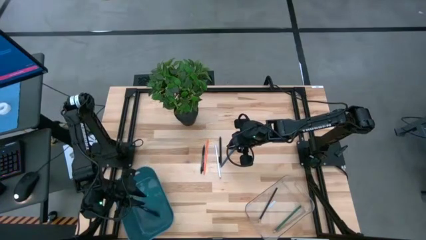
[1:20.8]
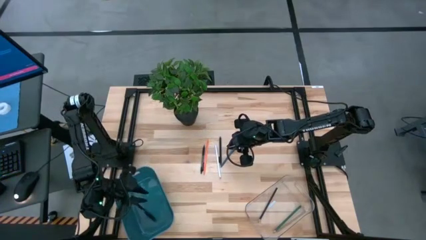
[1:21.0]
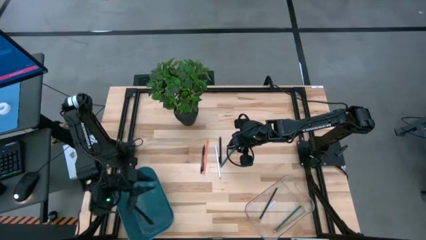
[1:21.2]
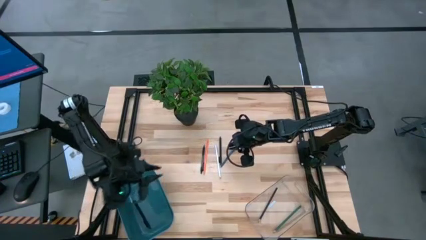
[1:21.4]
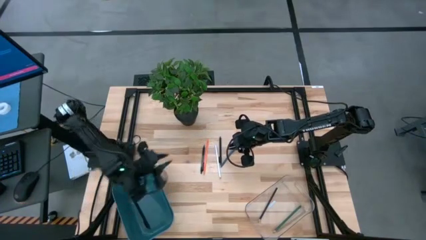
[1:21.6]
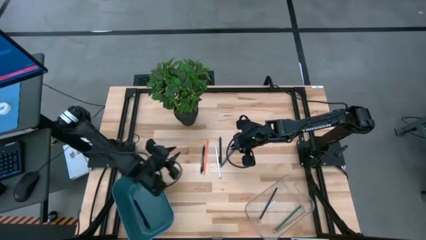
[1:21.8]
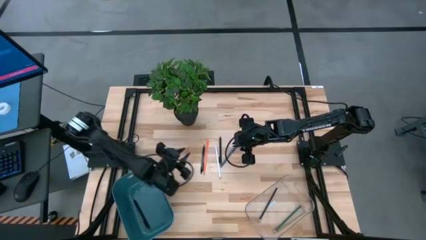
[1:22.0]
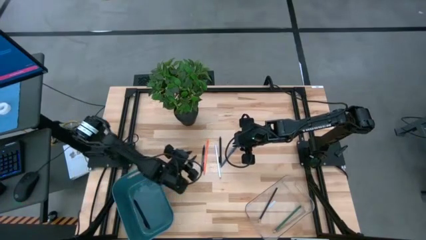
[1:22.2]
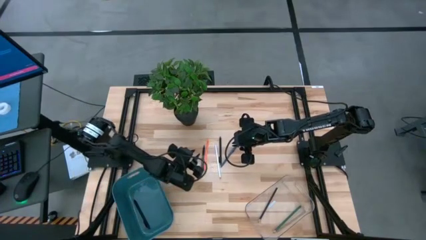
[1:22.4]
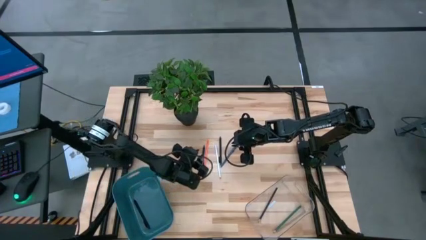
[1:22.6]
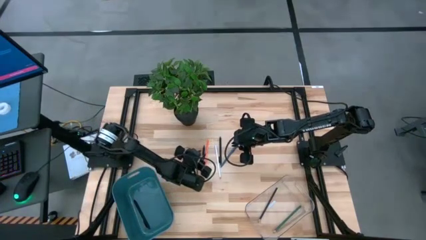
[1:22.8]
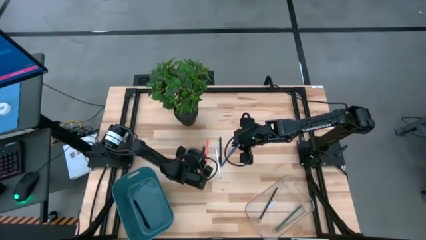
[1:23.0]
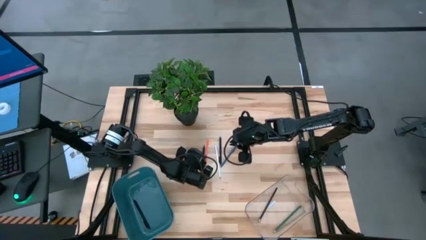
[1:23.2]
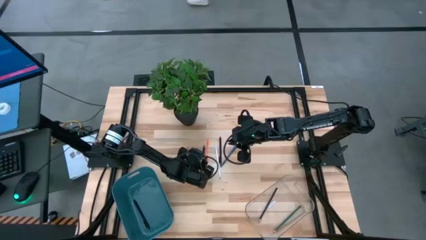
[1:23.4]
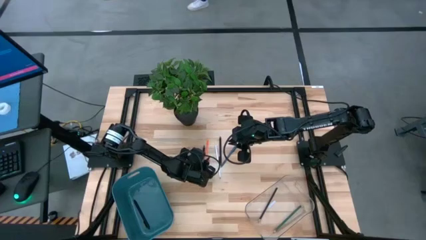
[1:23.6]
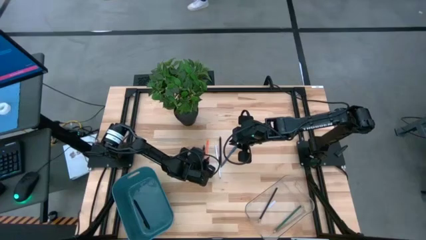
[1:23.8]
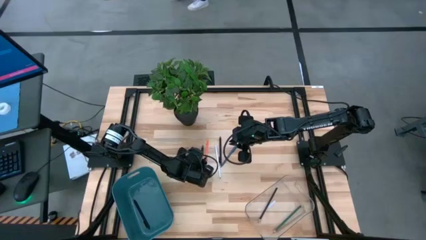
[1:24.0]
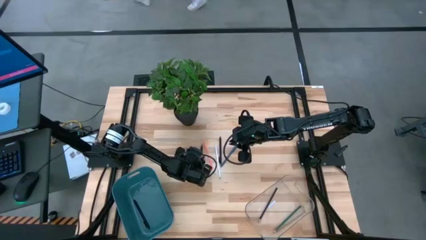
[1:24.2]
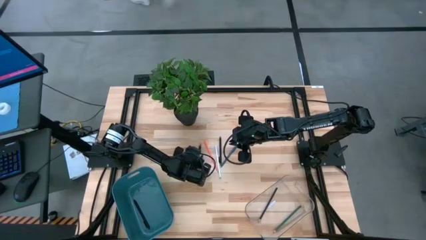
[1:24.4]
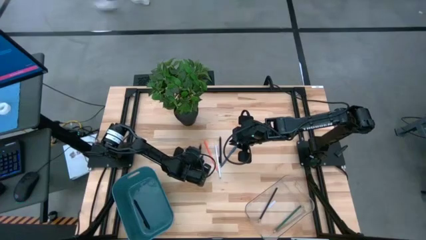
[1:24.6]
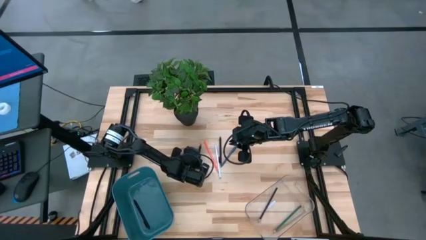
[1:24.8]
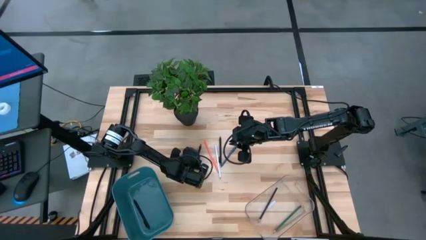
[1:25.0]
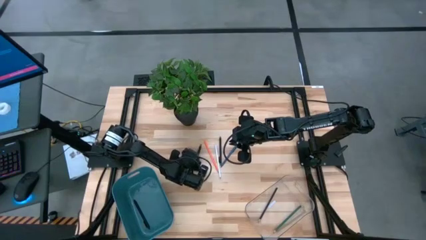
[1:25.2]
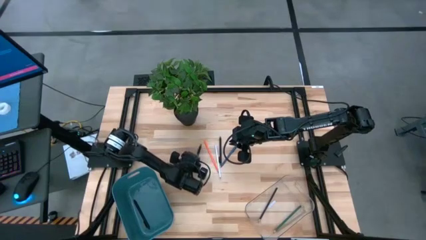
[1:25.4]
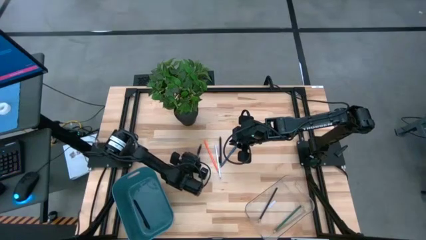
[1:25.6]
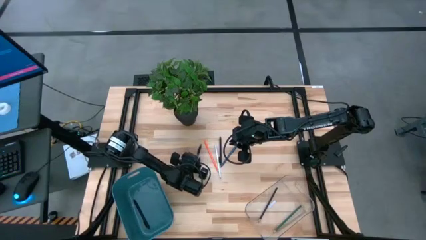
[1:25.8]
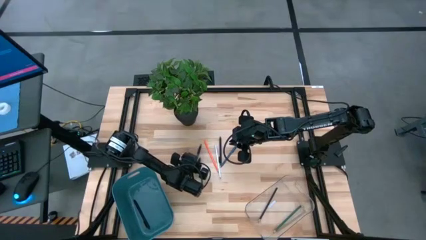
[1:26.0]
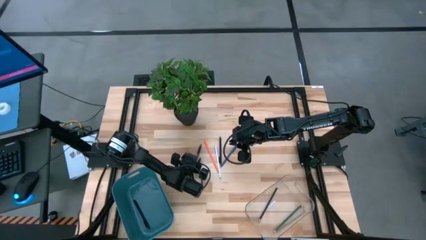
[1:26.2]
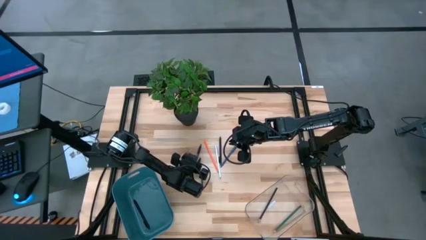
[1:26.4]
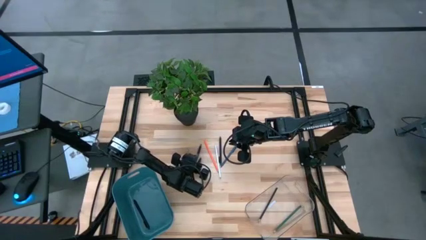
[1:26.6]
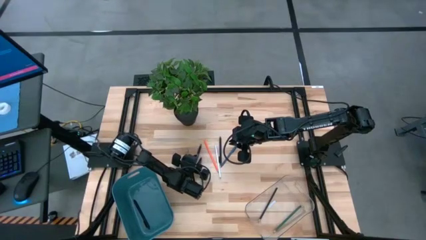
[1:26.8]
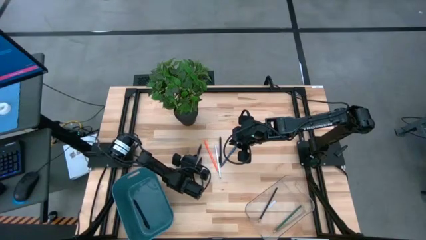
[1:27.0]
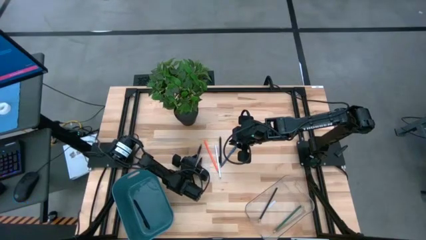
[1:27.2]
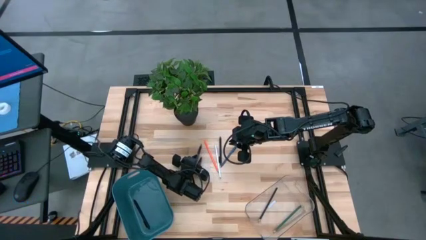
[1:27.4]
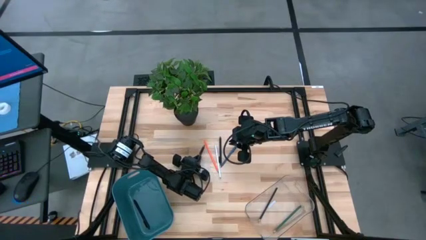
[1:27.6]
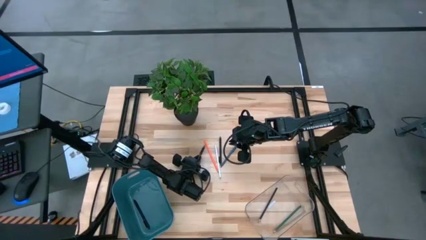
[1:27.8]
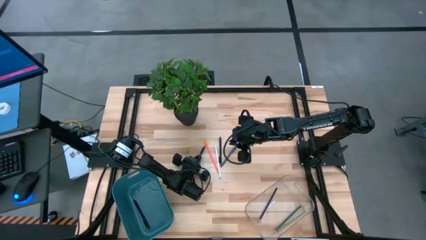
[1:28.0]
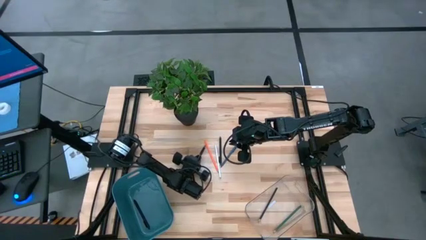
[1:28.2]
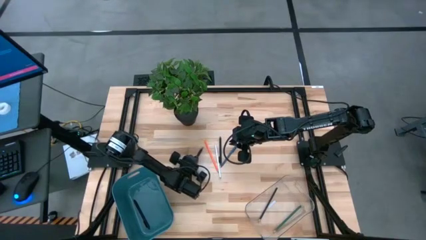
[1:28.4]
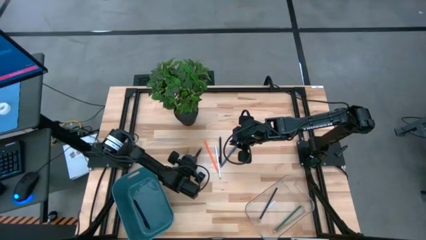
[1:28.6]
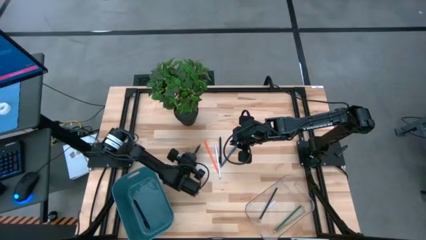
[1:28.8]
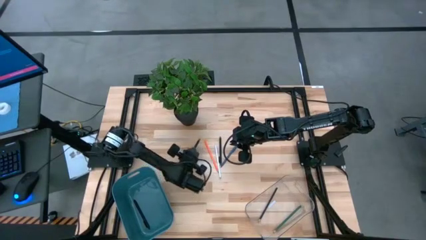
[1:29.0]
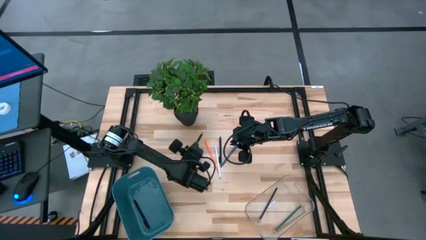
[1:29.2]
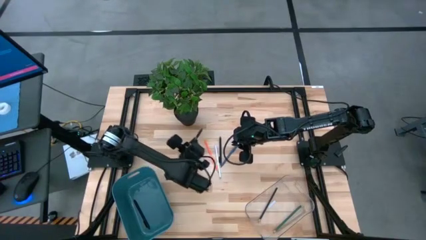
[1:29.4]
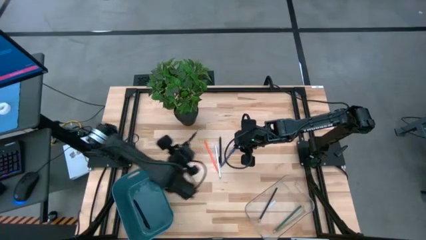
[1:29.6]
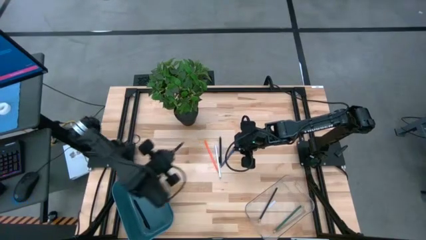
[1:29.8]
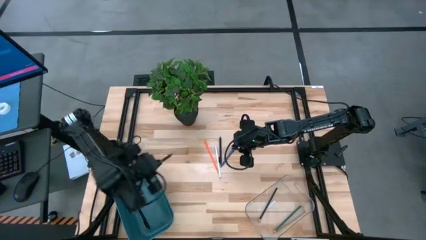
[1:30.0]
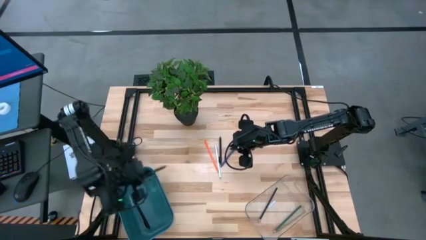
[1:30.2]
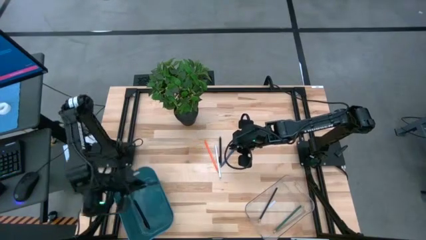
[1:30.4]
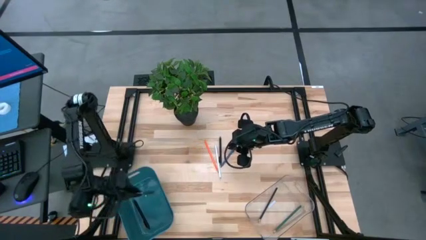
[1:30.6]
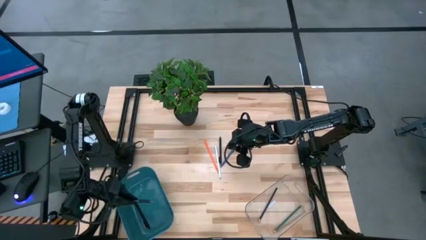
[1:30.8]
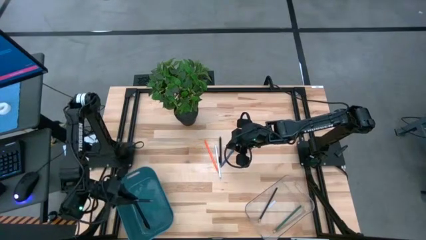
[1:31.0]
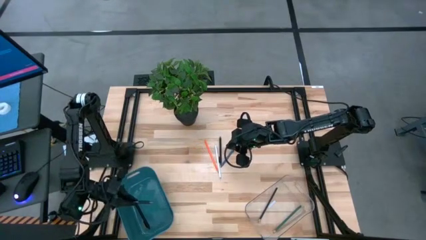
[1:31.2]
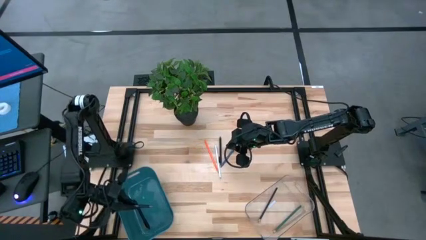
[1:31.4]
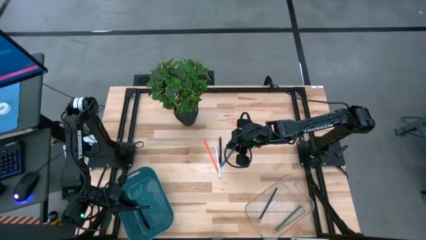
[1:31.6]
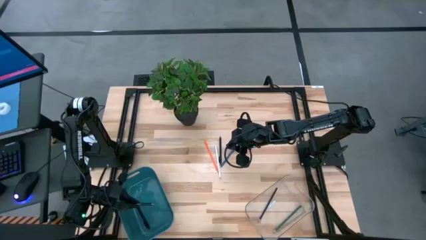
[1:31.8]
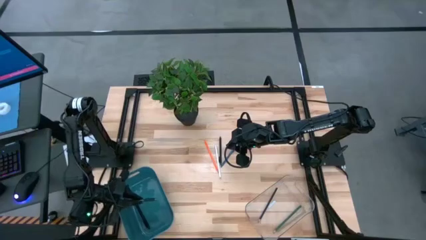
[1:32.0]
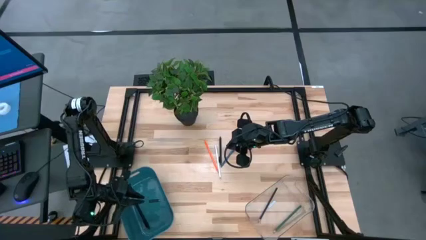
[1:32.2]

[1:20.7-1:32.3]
Task: Sort pens & pencils
Put the left black pen into the blue bin

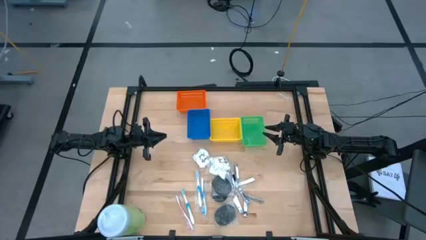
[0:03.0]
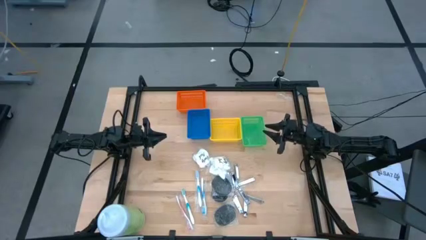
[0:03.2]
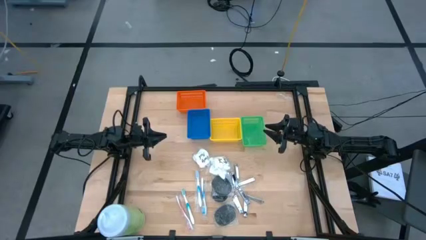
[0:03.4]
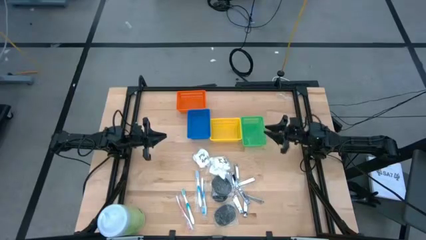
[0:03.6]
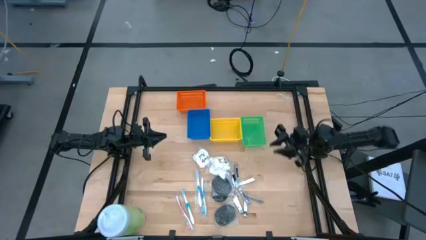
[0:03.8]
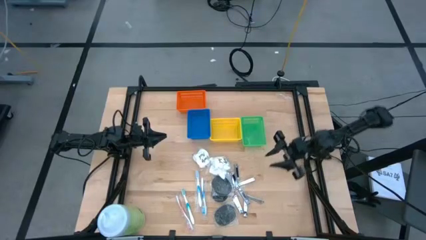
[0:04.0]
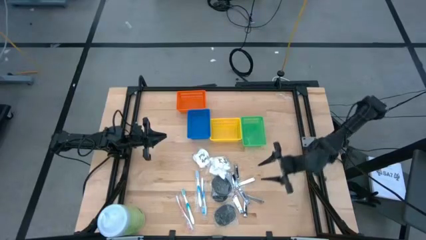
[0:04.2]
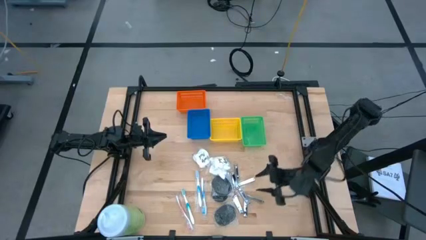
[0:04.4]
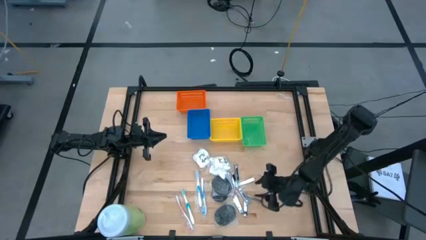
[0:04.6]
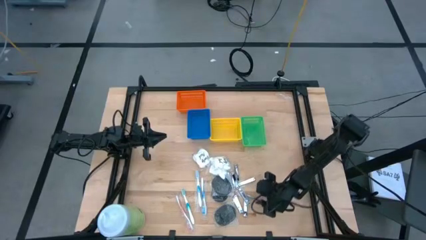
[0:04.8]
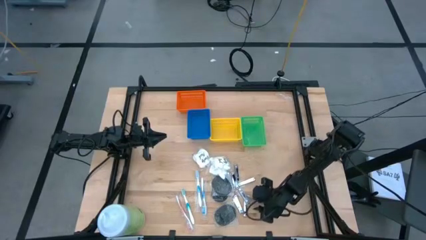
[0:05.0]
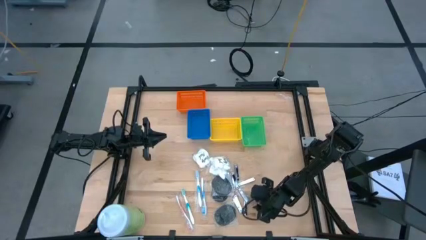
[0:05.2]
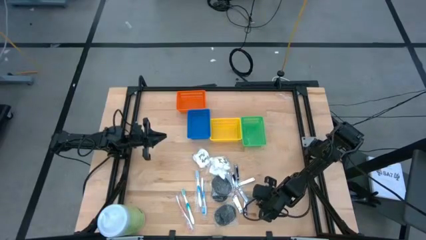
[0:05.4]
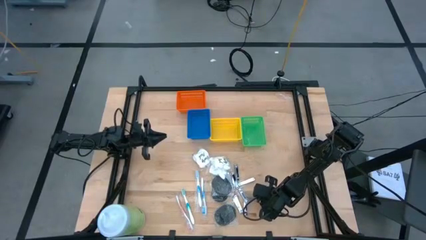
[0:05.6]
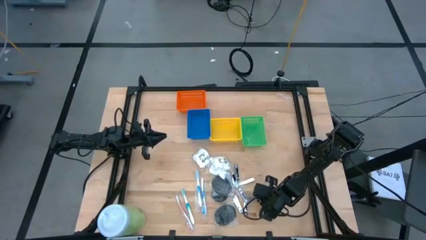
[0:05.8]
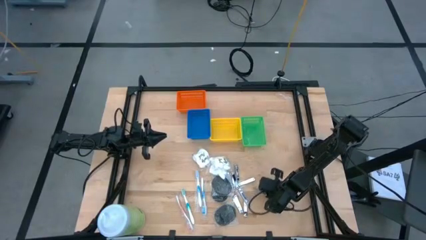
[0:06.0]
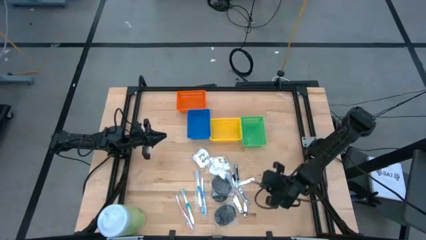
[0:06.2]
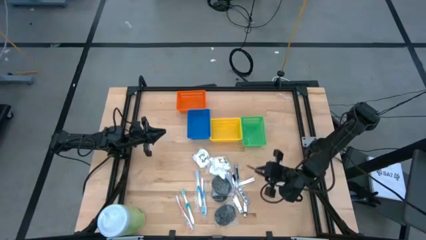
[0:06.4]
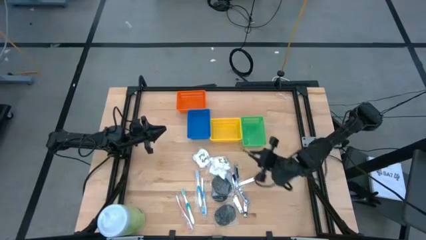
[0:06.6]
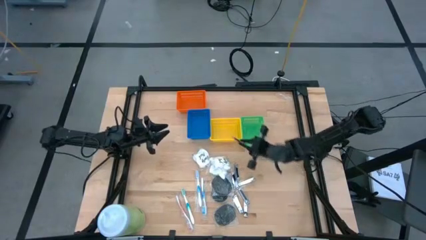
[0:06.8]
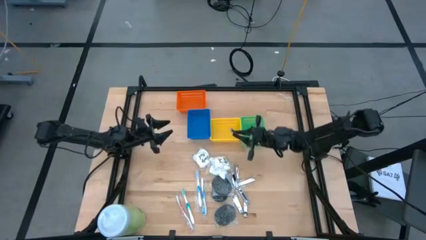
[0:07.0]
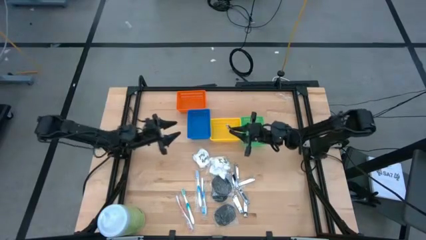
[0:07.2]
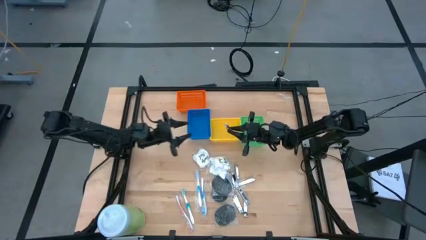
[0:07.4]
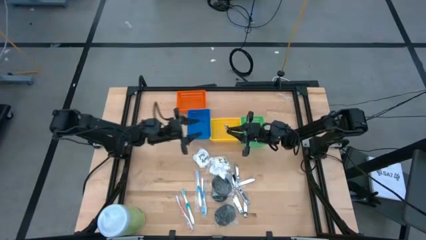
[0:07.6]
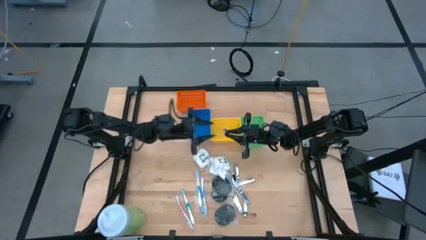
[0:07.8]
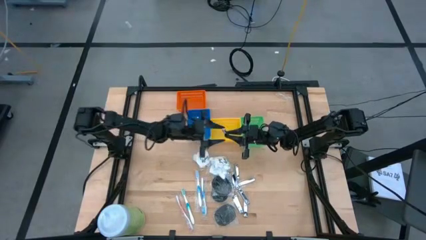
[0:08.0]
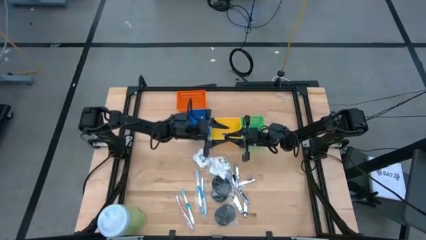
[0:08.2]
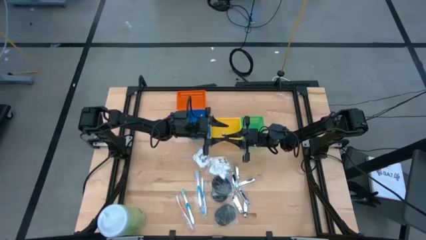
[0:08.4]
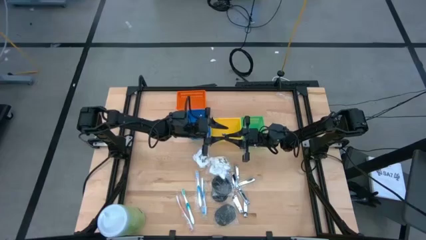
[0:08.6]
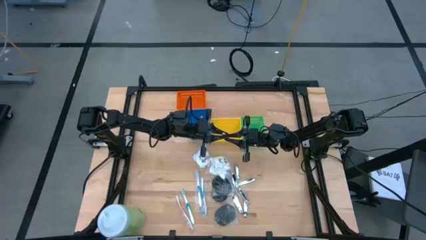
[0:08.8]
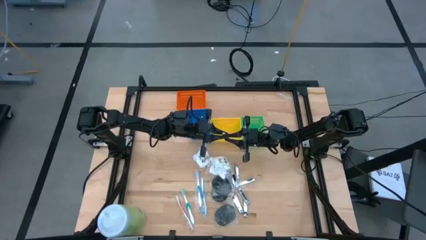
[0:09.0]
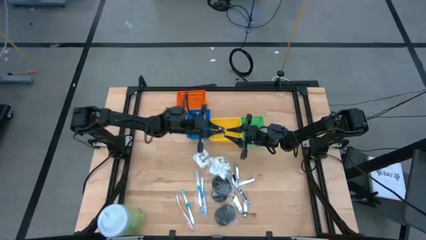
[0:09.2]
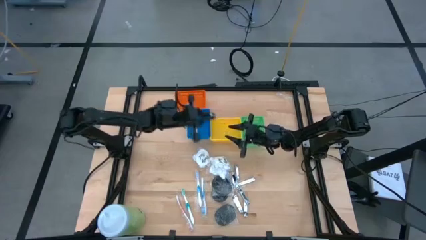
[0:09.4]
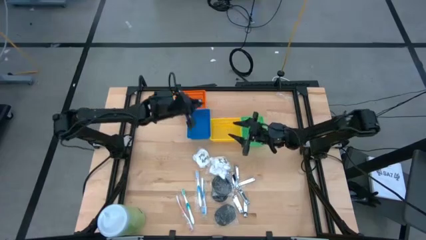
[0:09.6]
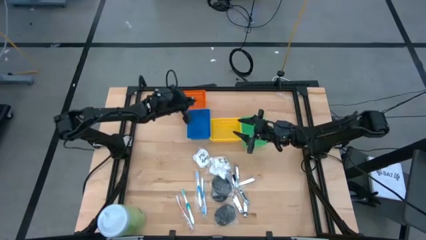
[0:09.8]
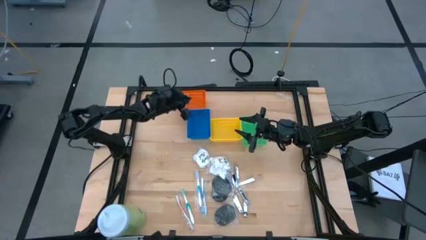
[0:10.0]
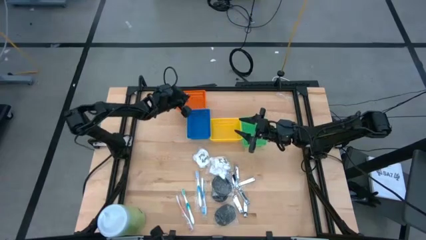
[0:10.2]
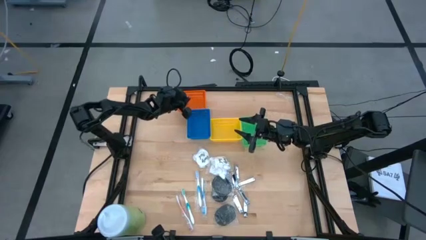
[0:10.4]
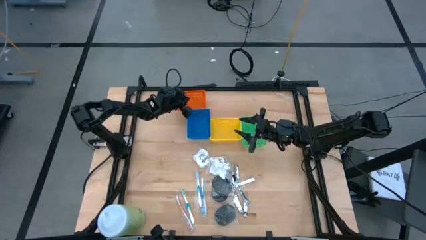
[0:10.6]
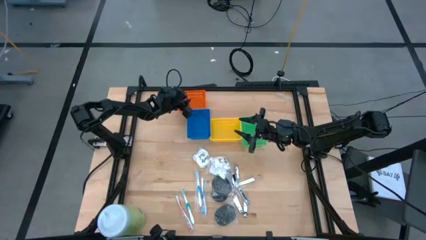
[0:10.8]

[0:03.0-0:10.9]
Task: Pick & Place Travel size toiletries
Put the nail cutter into the orange basket
